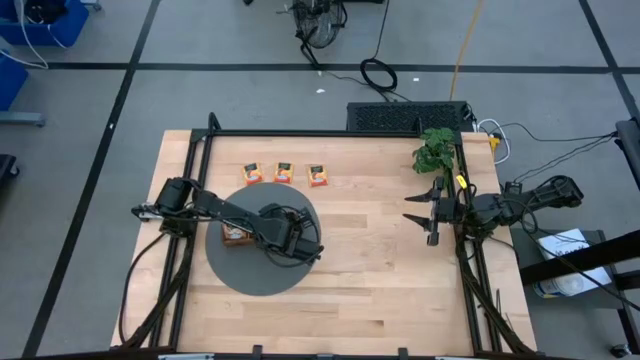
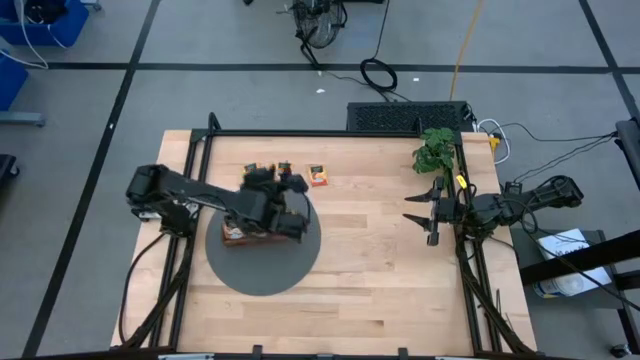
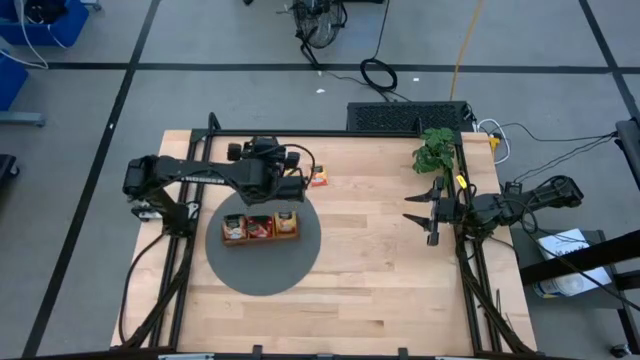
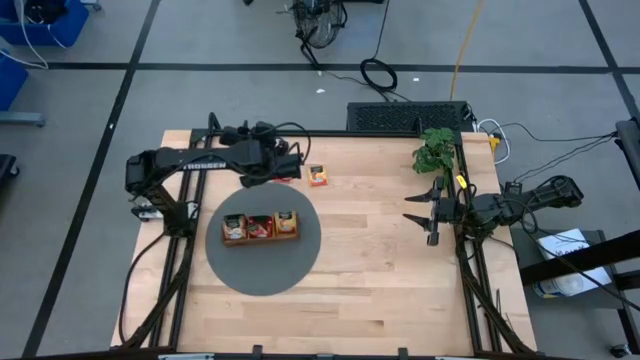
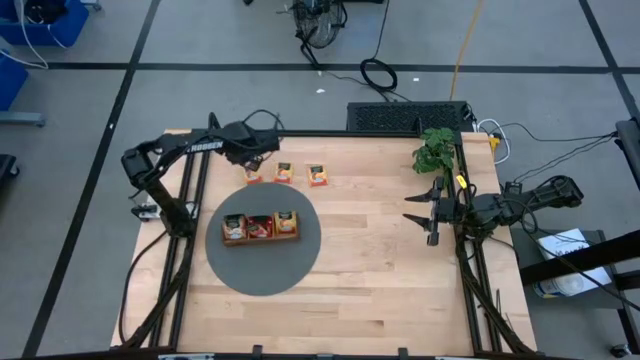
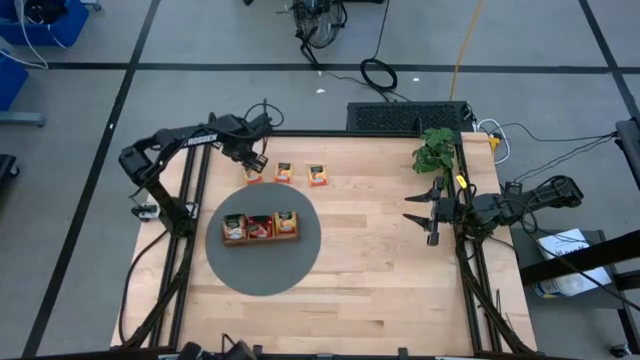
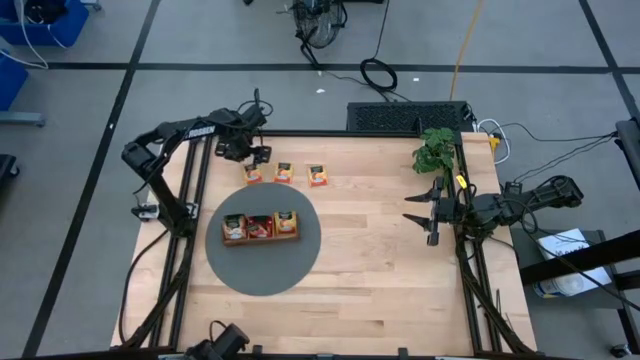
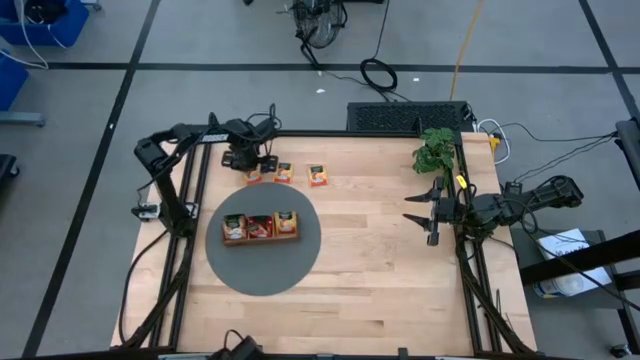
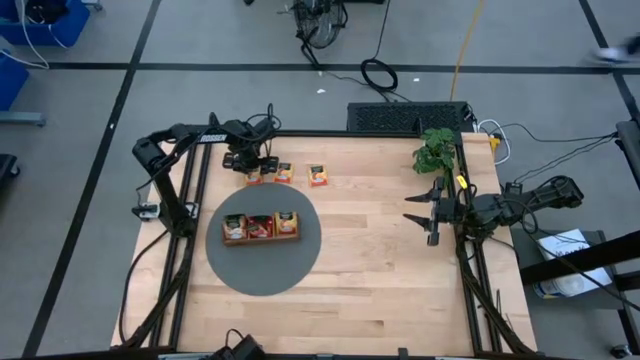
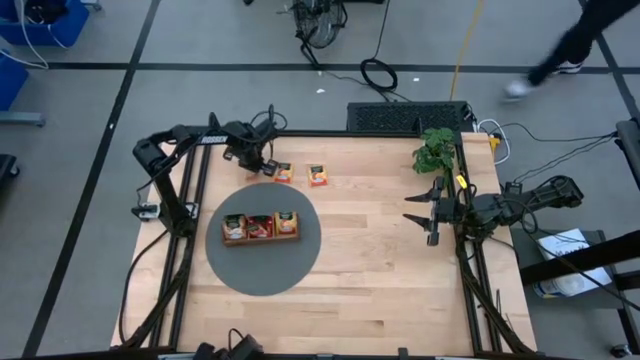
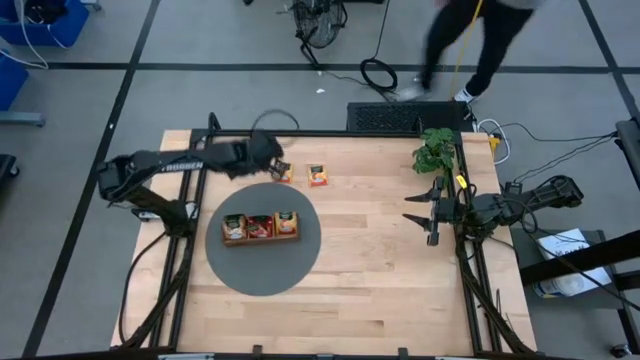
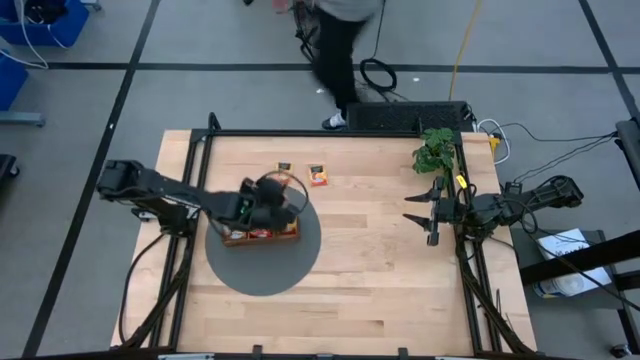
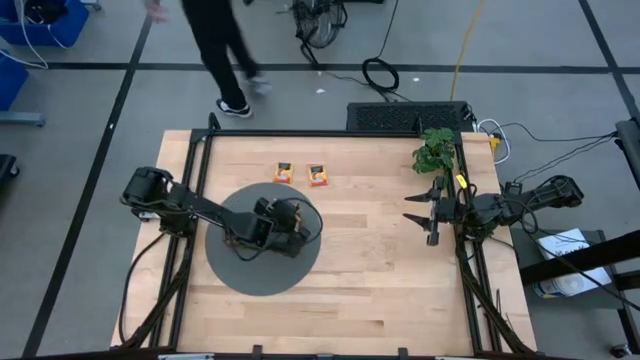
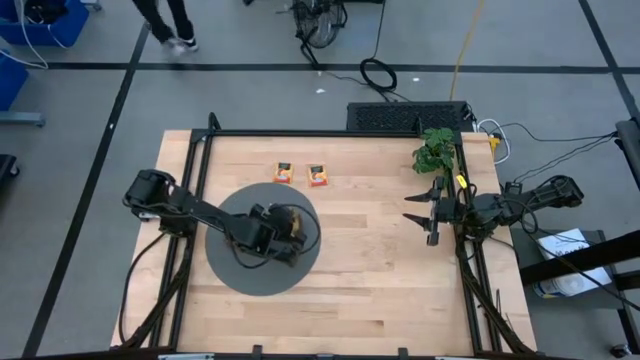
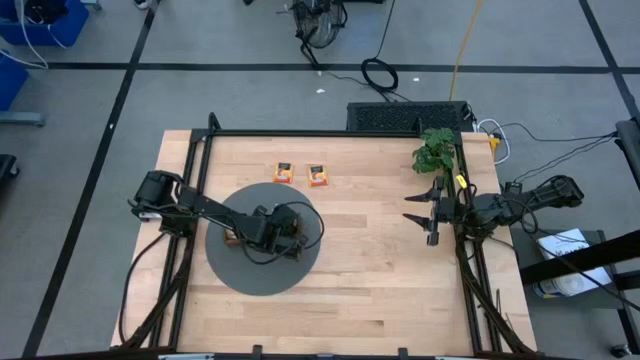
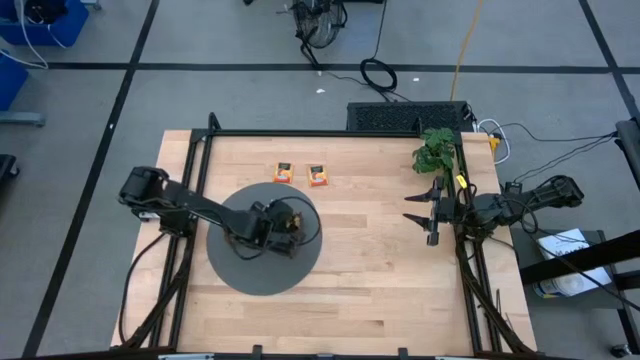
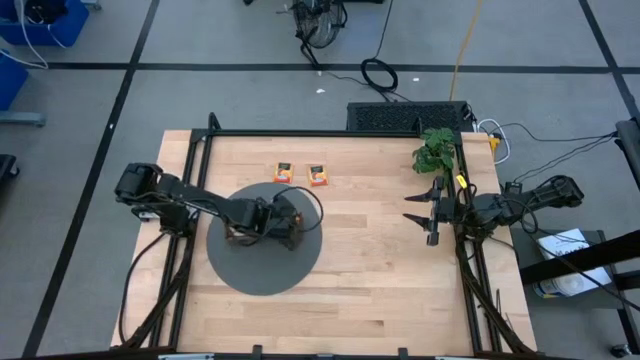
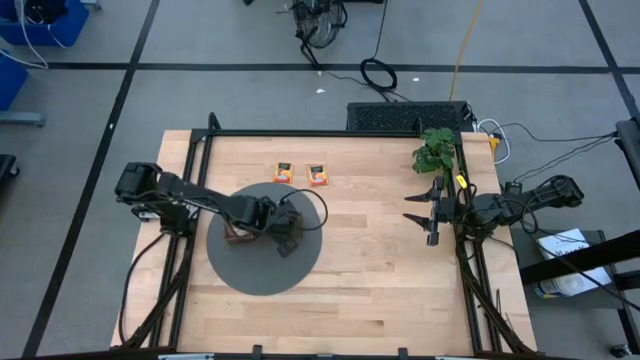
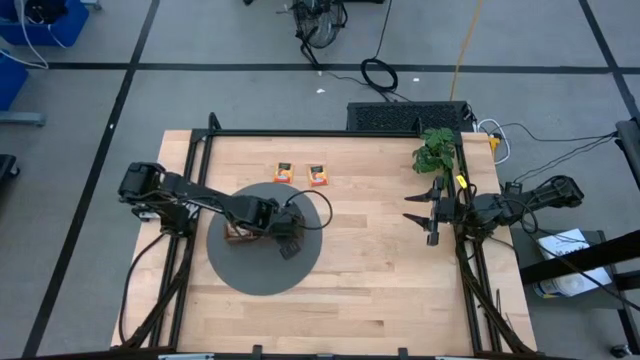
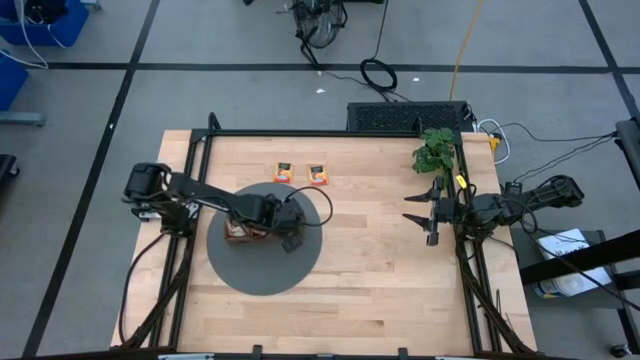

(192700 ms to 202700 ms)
Task: Pick & Place Tea
Put the yellow tea bag into the right section of the wooden organizer

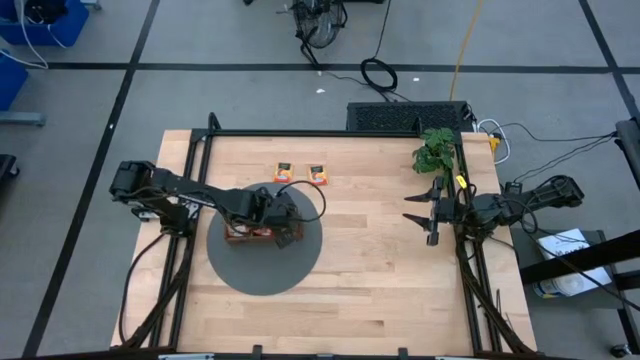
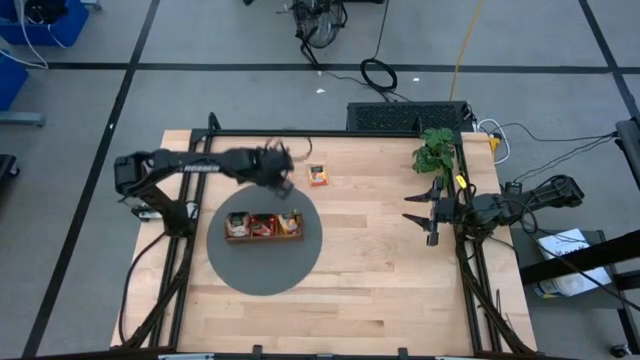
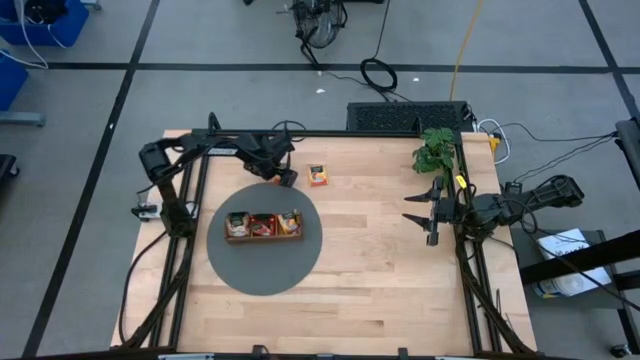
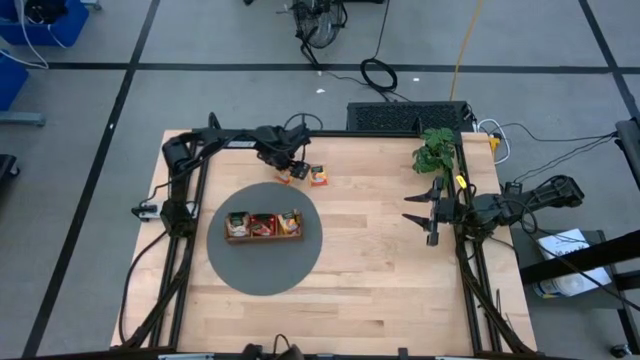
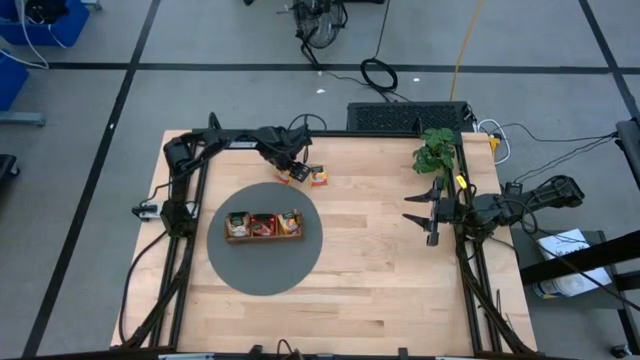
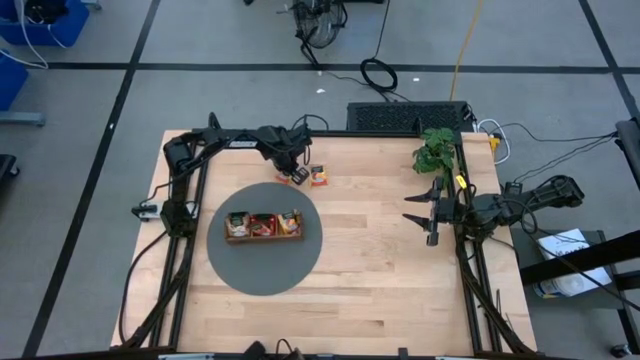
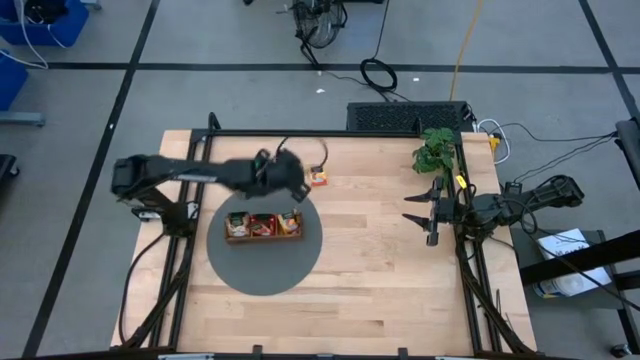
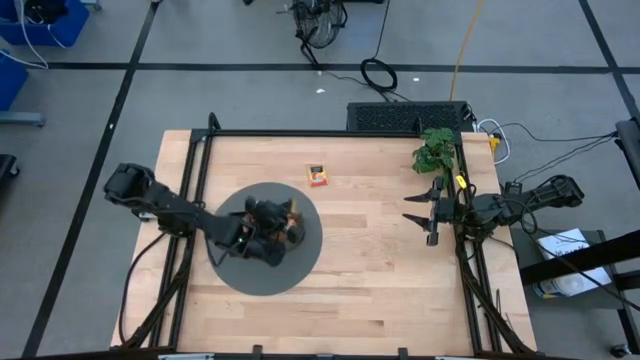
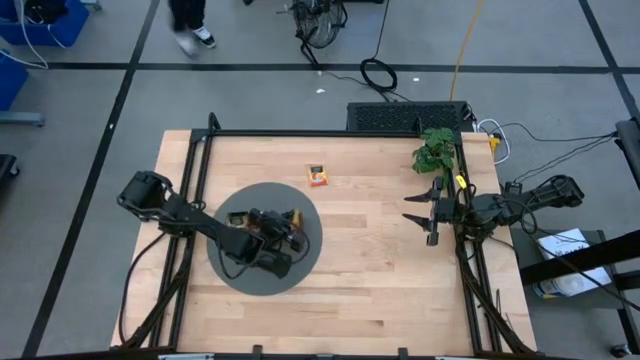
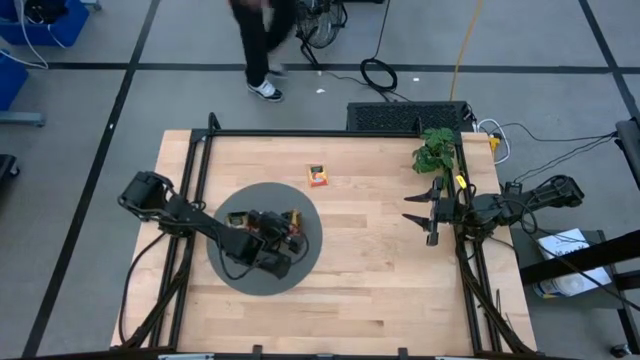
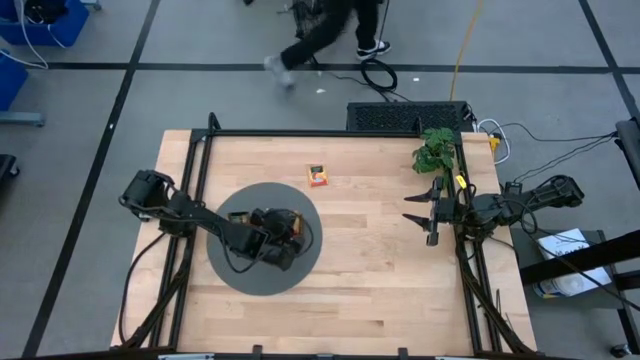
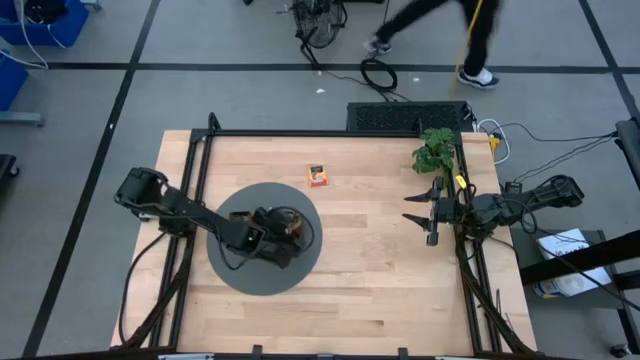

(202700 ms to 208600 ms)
Put the yellow tea bag into the right section of the wooden organizer

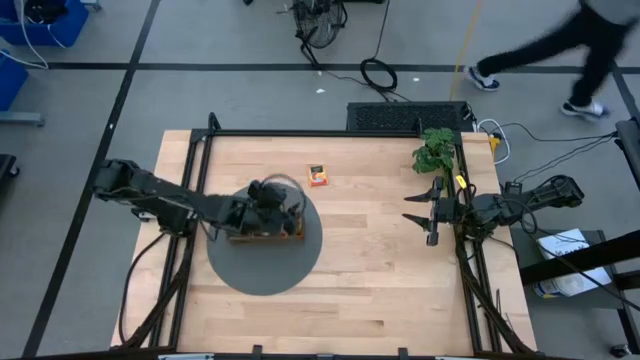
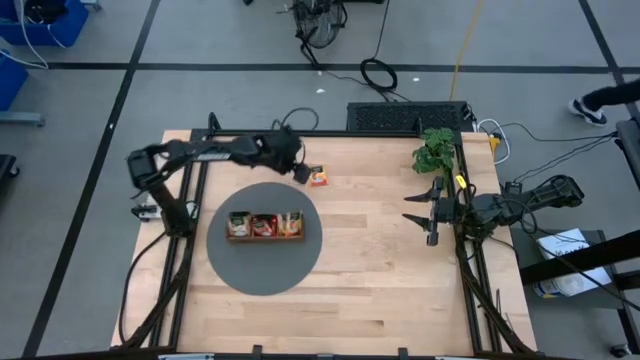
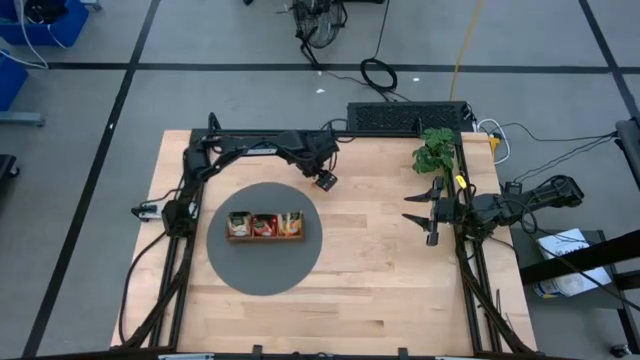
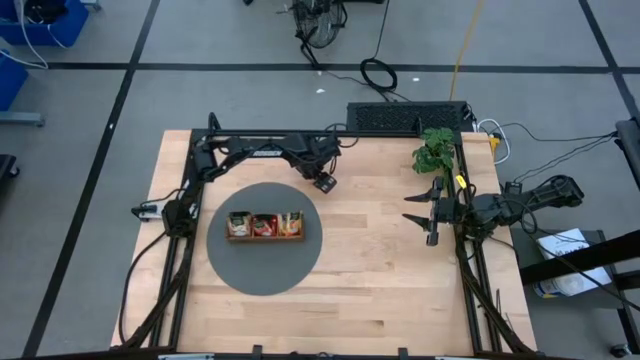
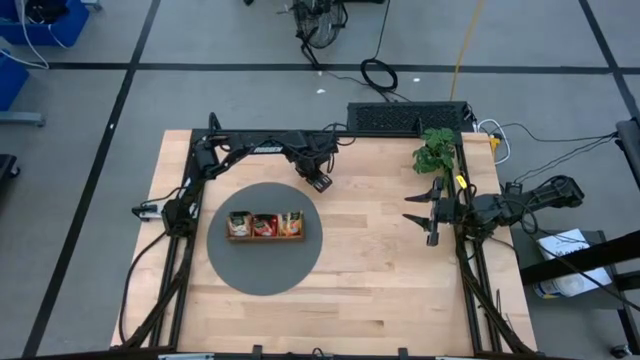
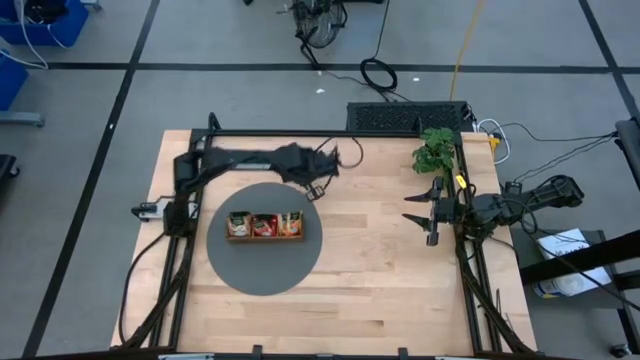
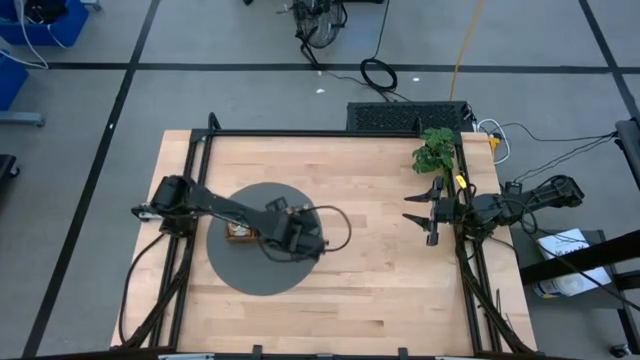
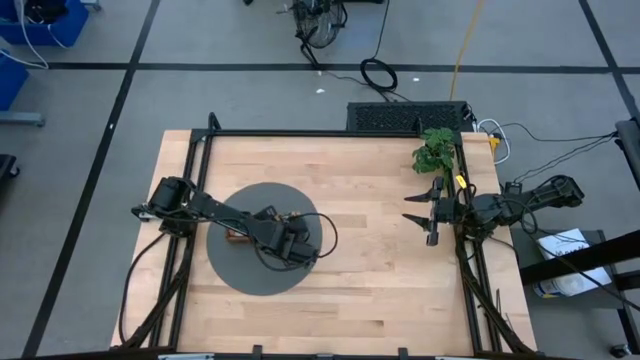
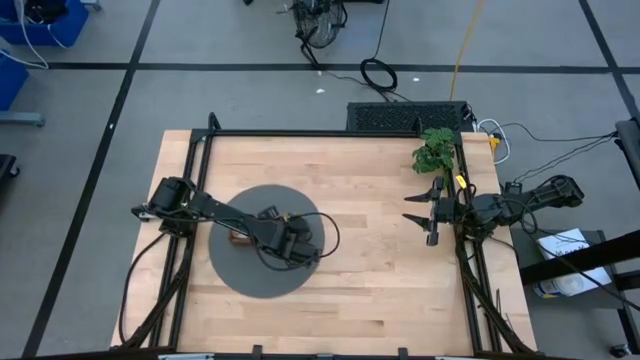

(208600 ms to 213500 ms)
Put the yellow tea bag into the right section of the wooden organizer

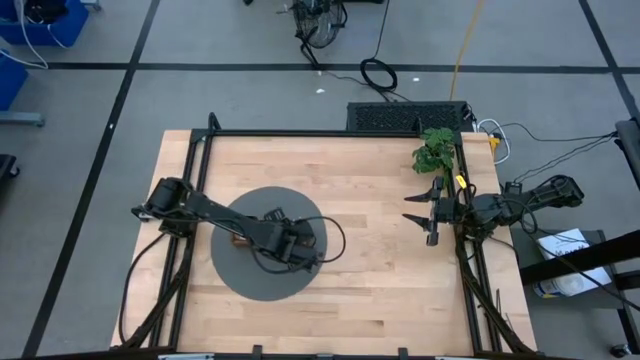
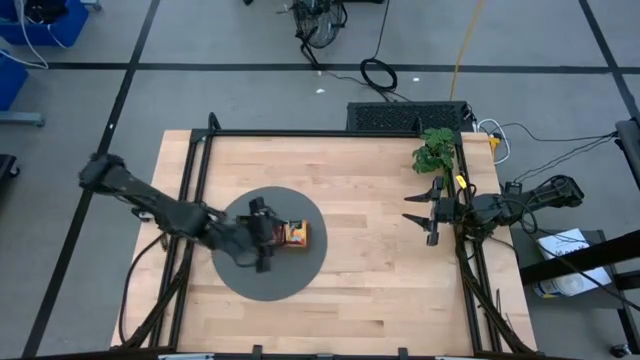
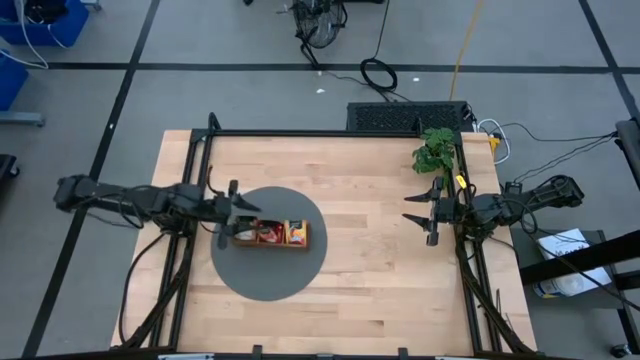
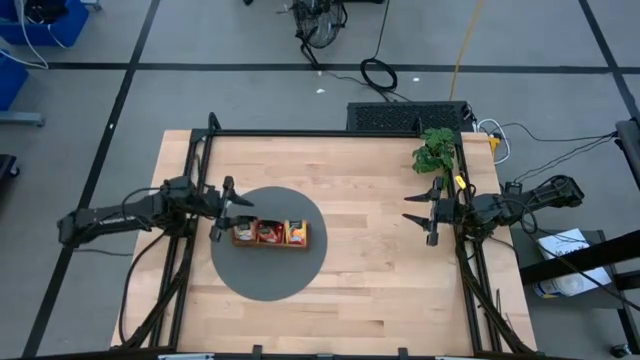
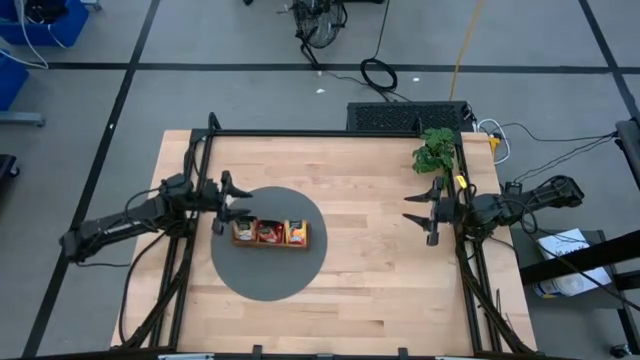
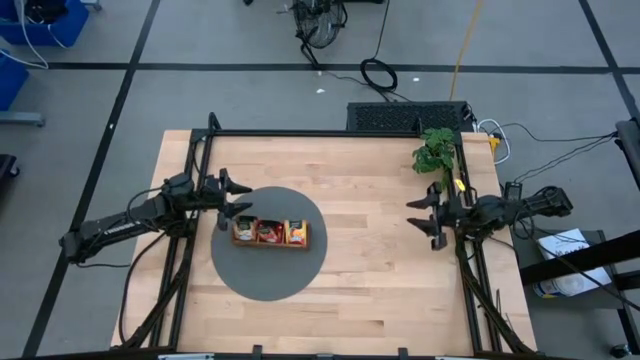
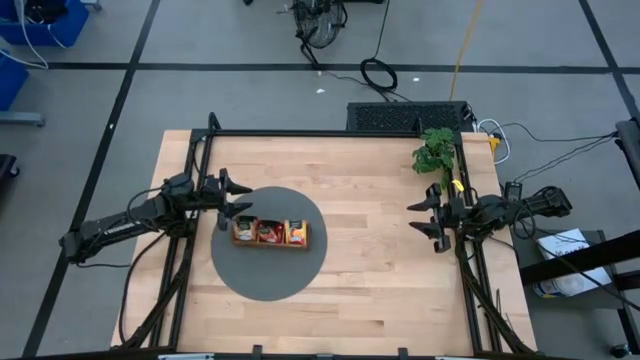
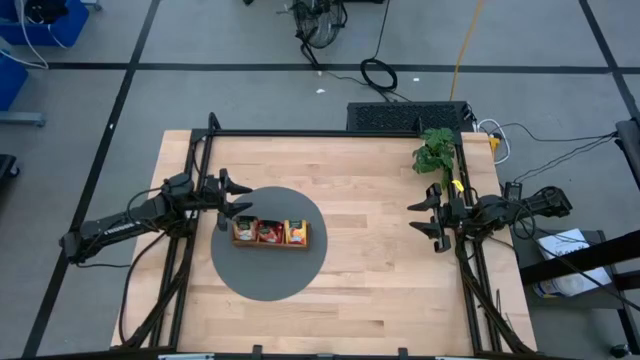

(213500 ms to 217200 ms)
Return to Home Position
